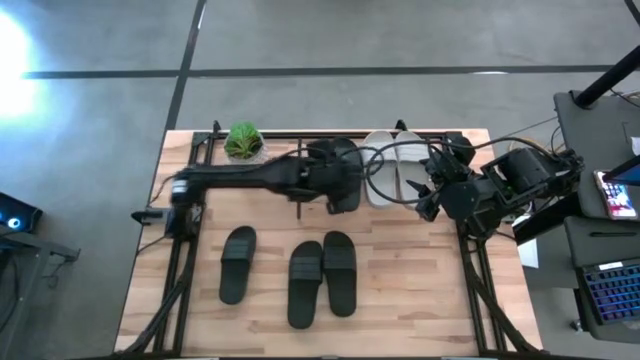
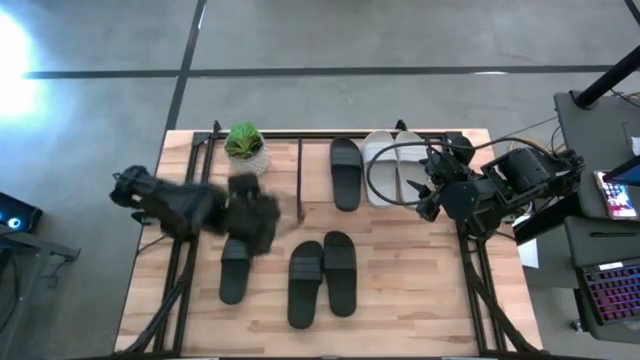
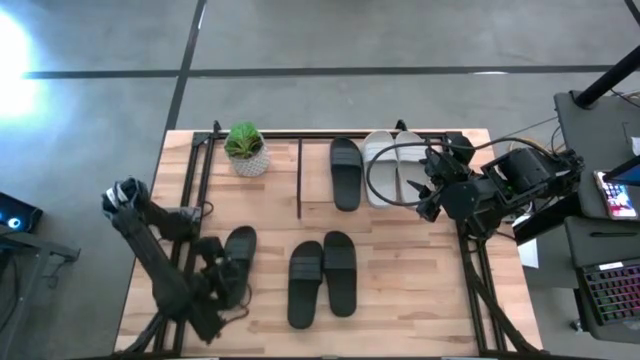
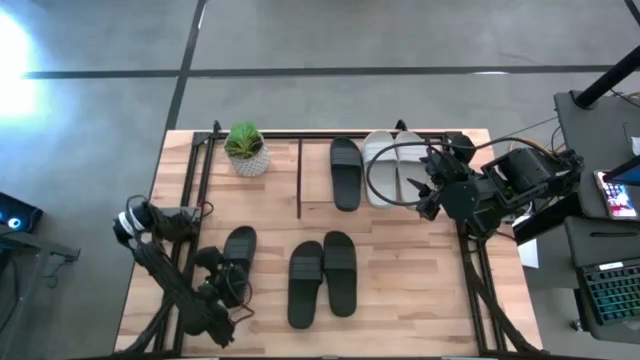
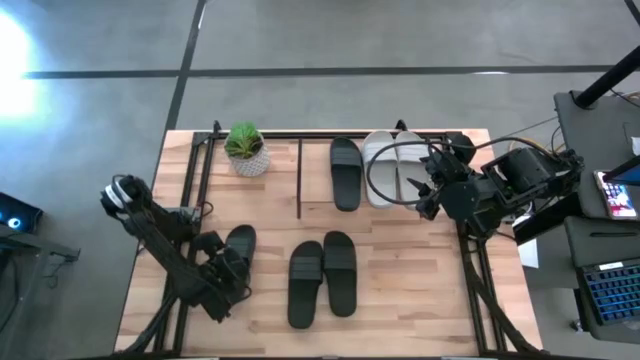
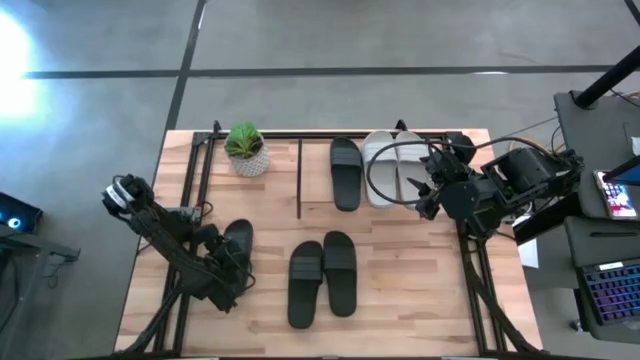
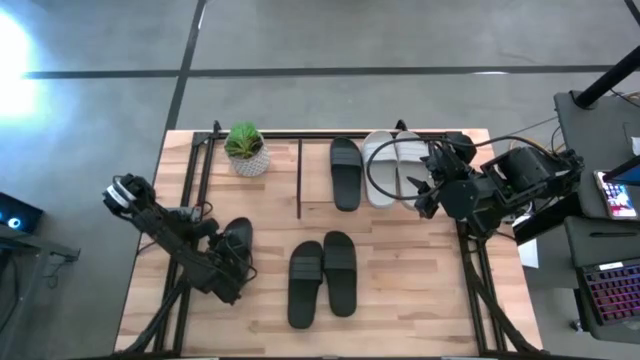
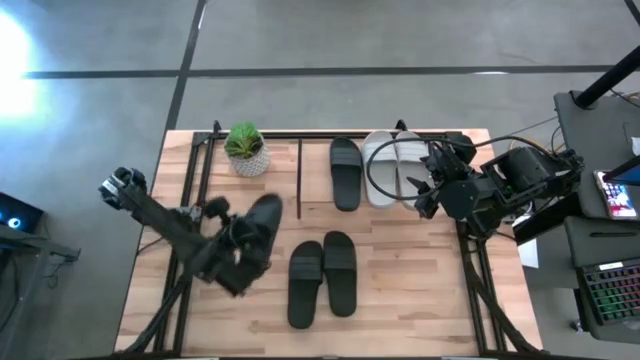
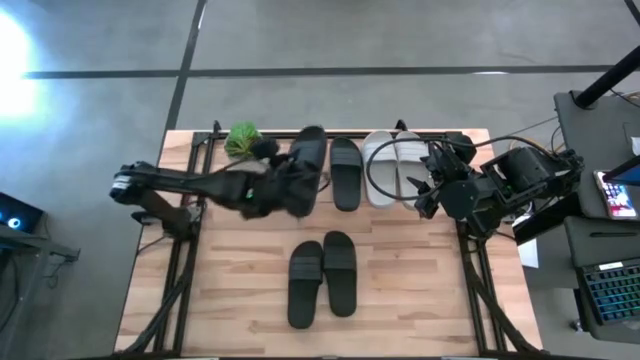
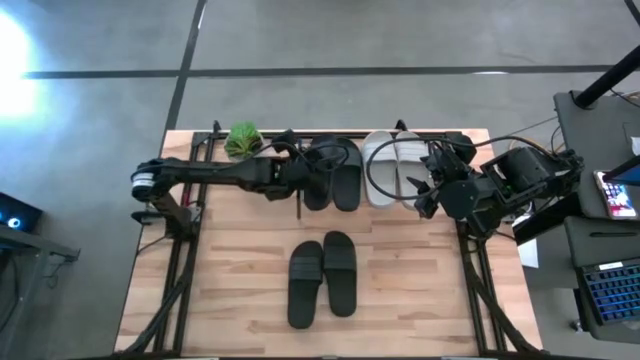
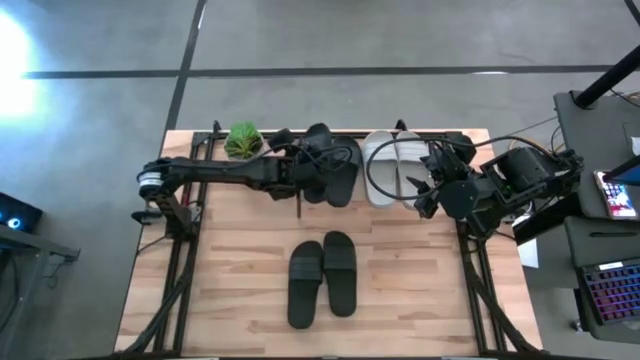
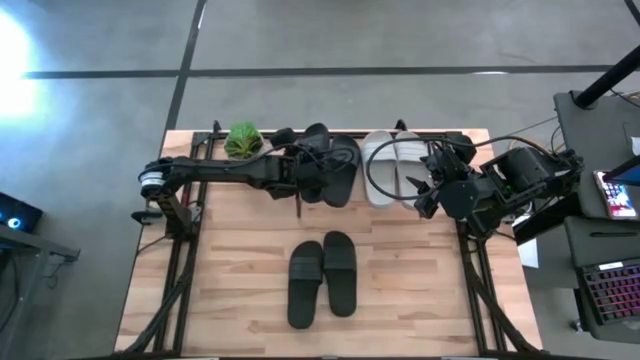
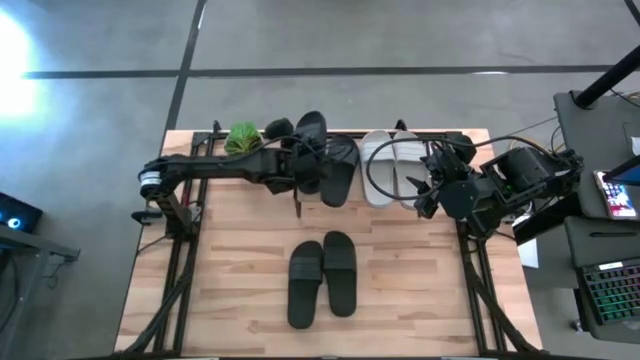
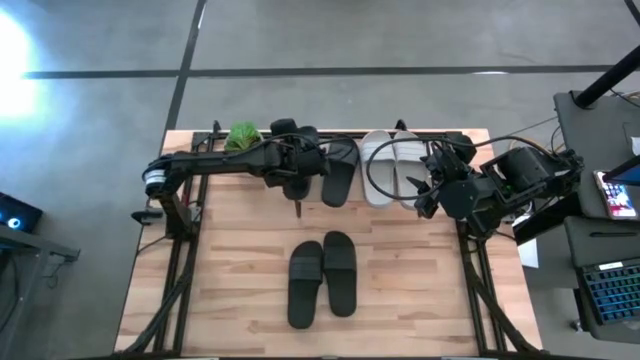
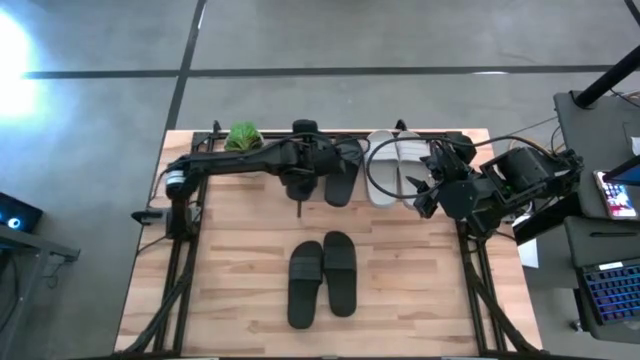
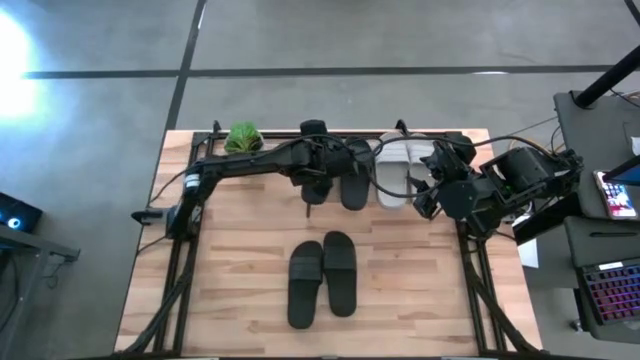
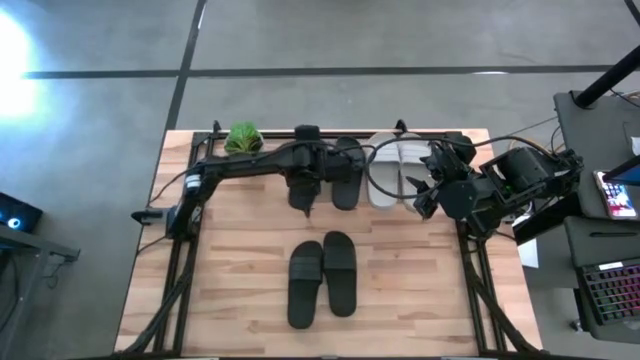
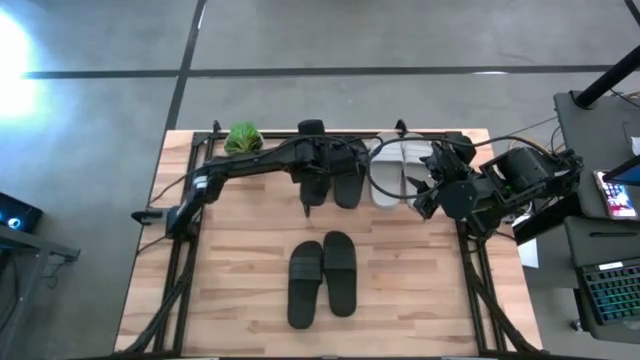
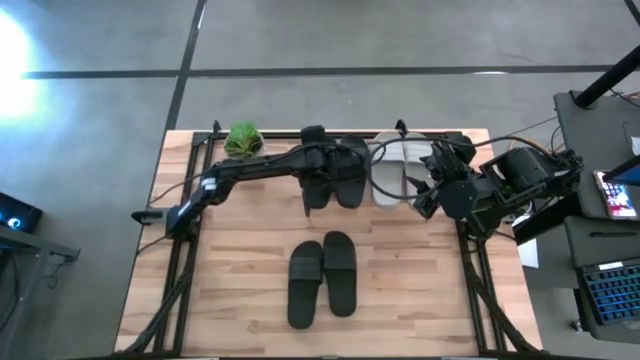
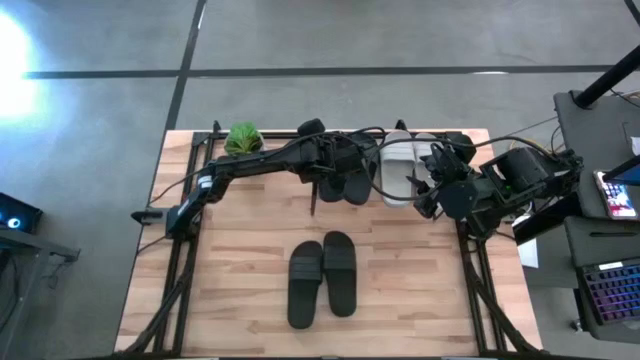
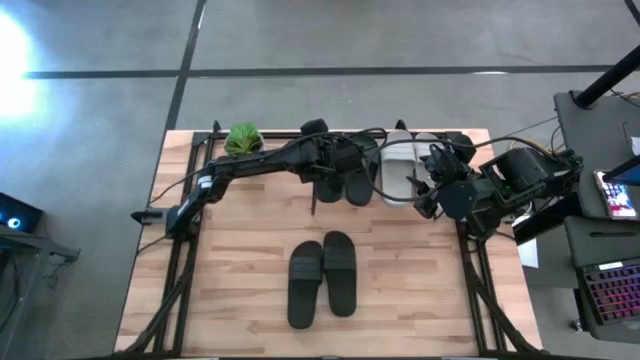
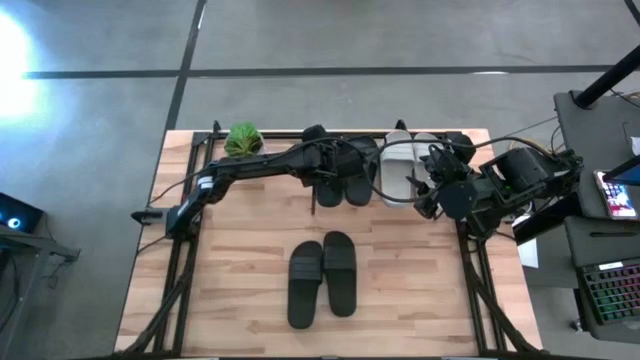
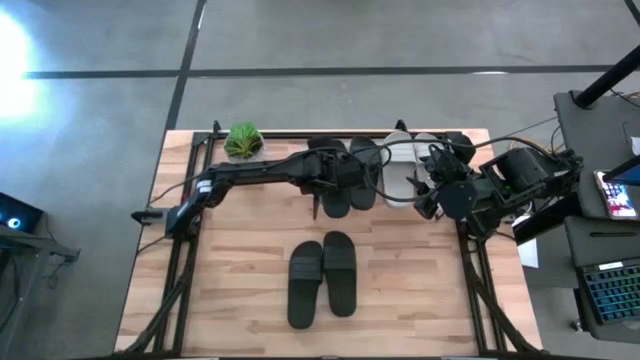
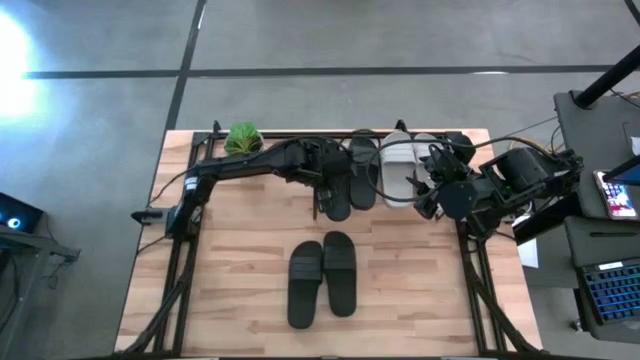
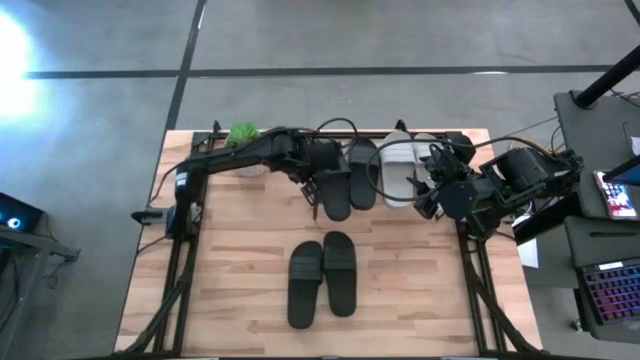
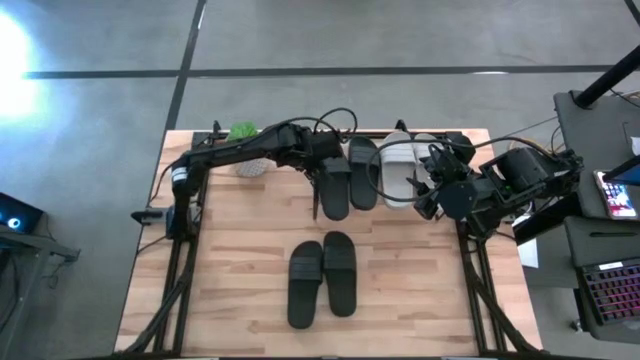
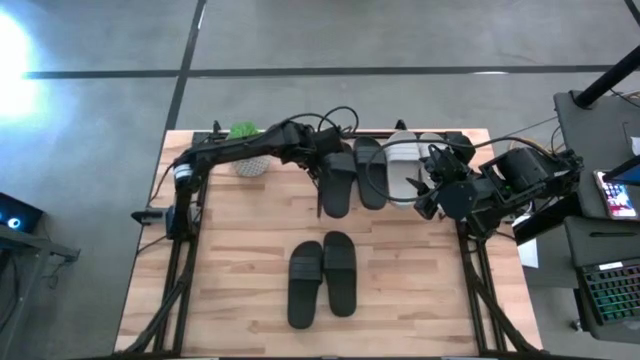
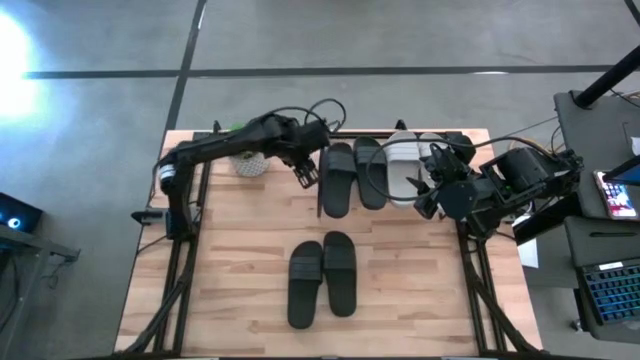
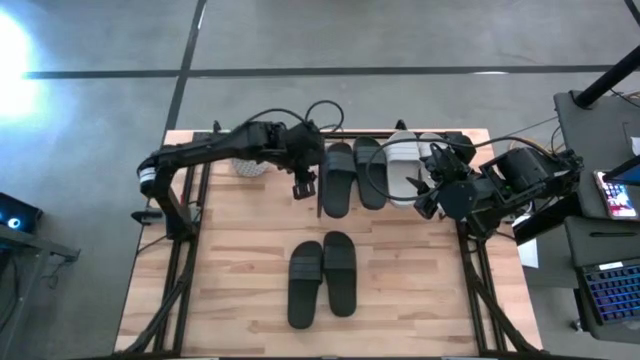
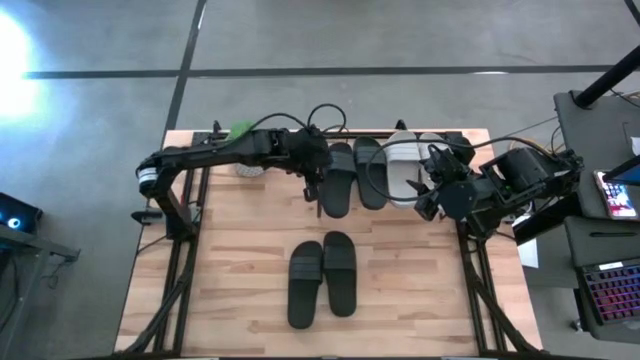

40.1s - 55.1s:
Task: Pick and place slides into the shelf
Put the black slide on the shelf

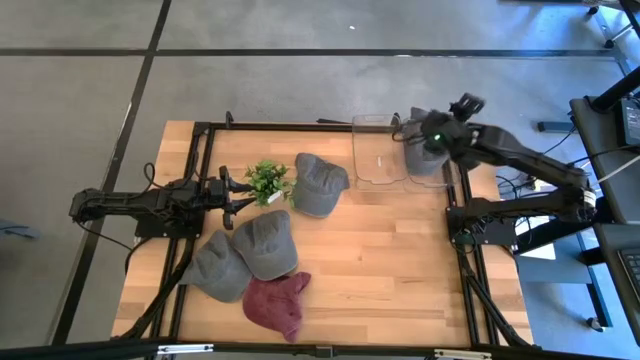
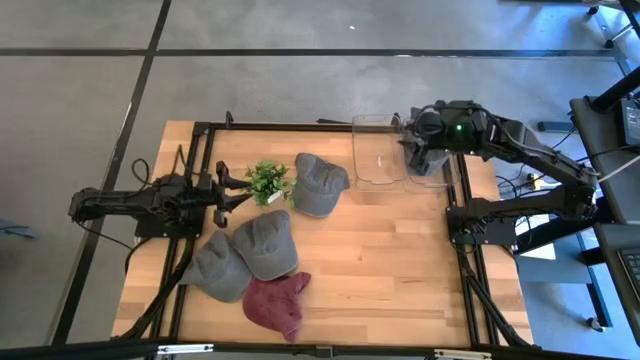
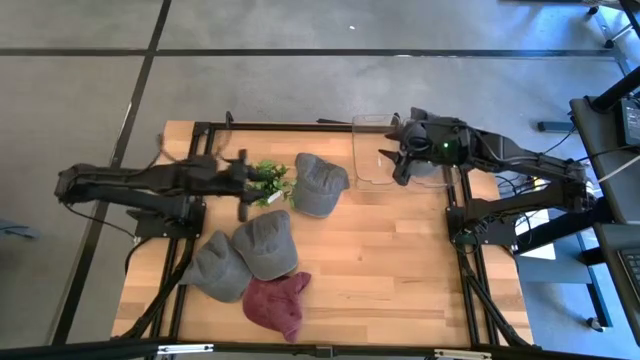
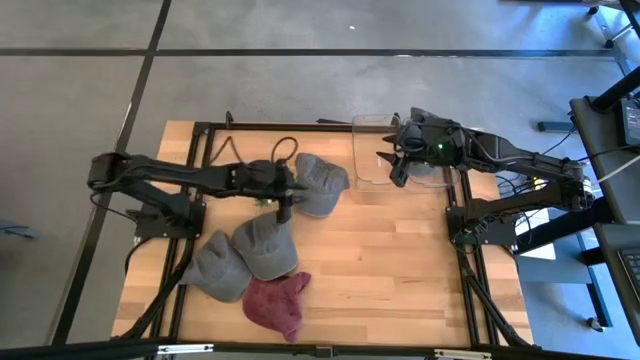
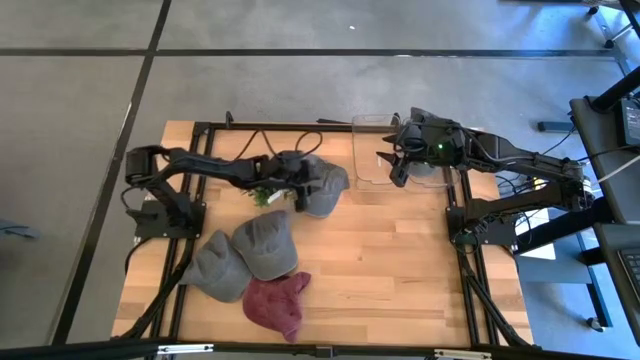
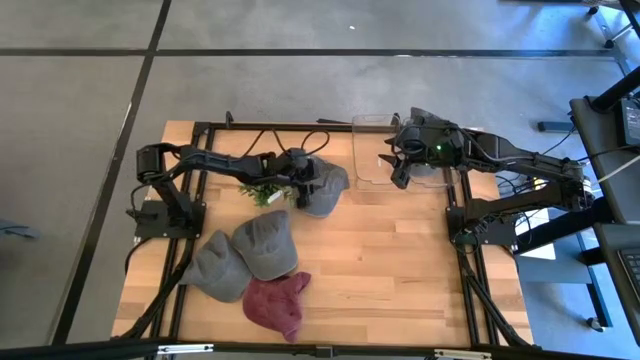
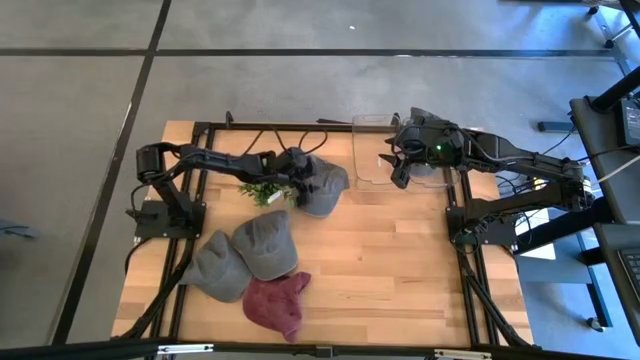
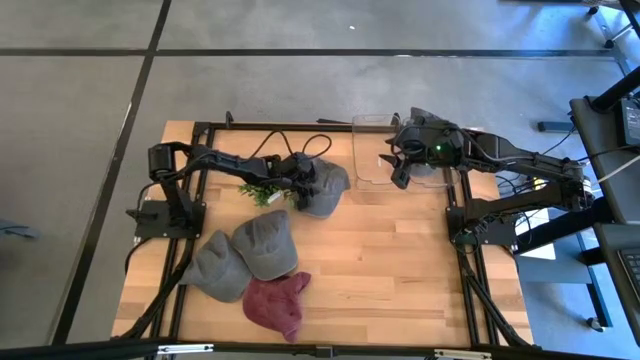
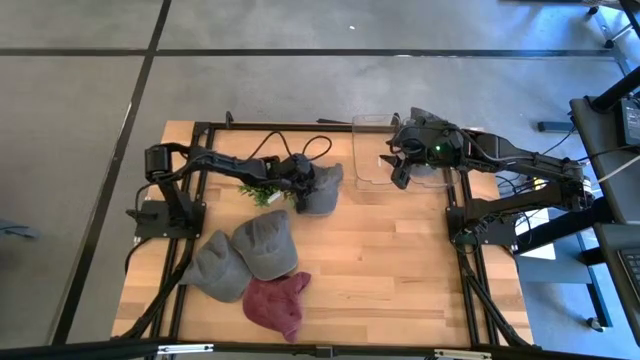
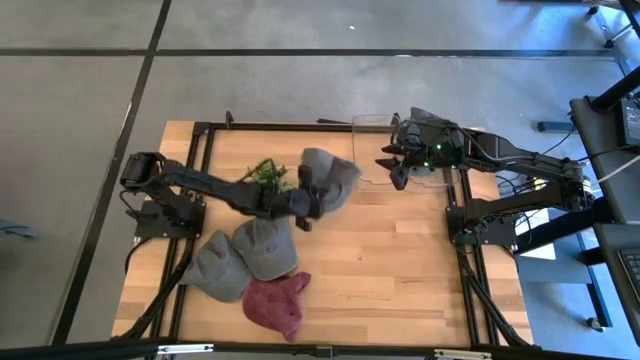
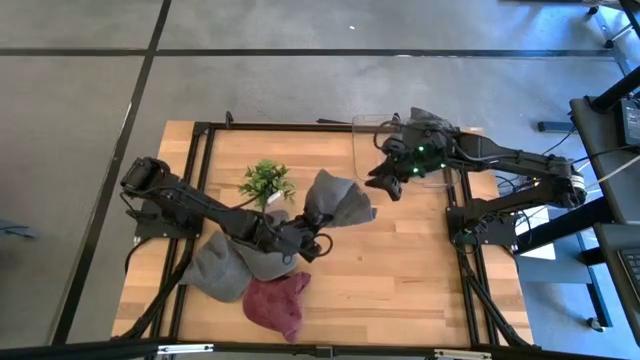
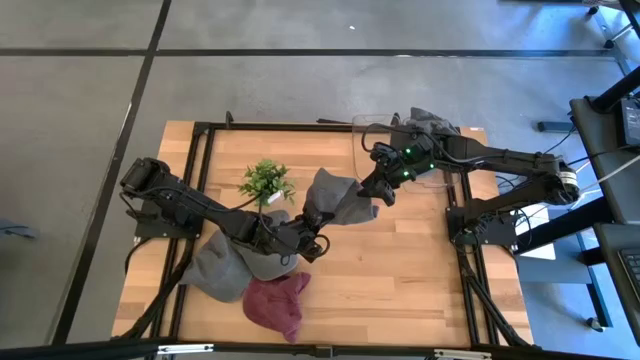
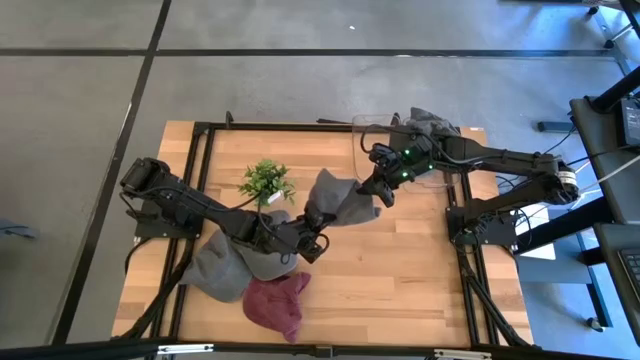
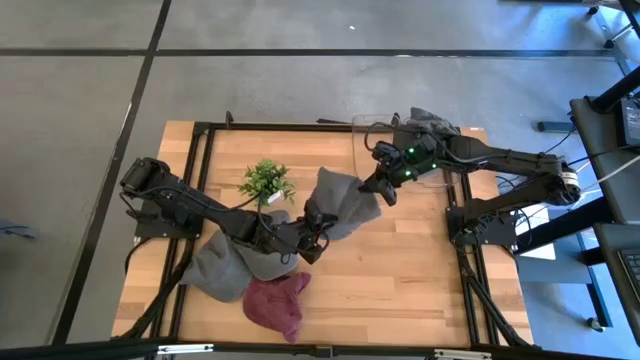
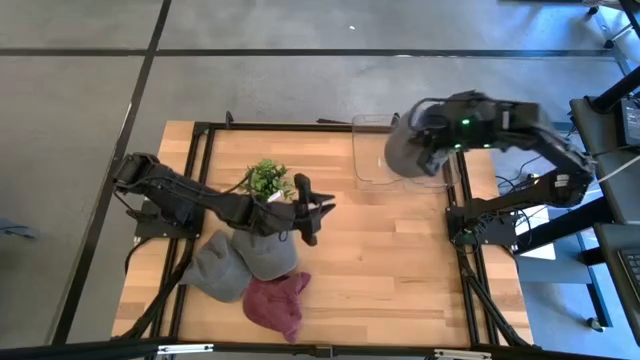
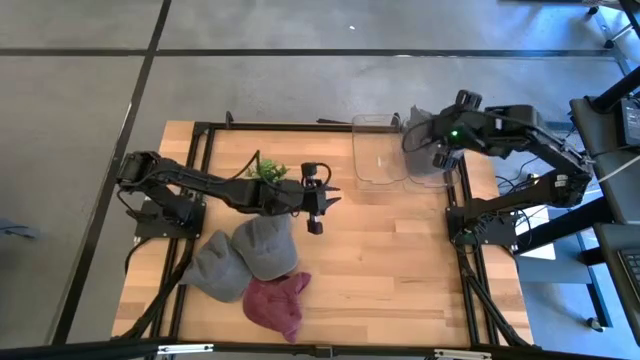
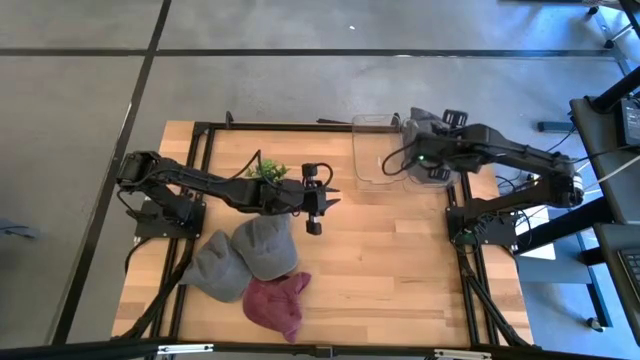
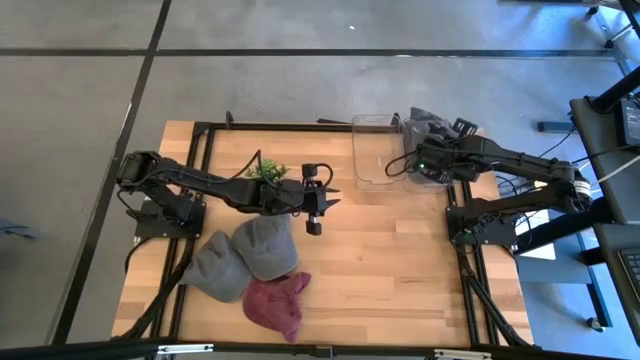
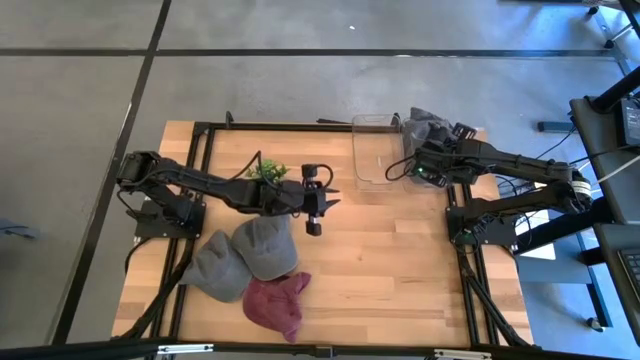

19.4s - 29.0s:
Task: Pick & Place hat
Put the gray cap into the right transparent bin
